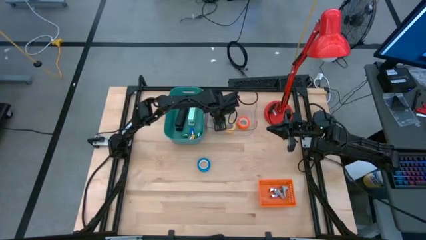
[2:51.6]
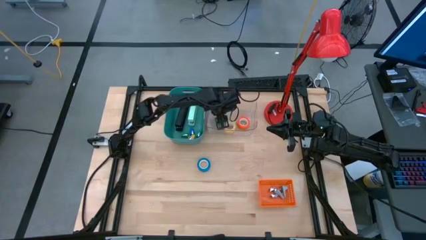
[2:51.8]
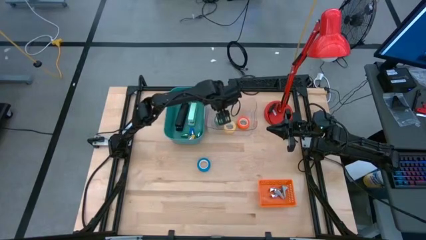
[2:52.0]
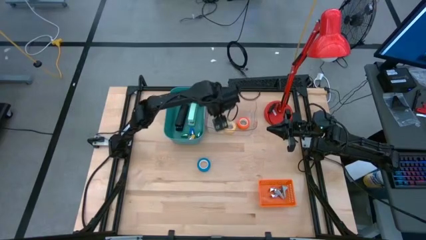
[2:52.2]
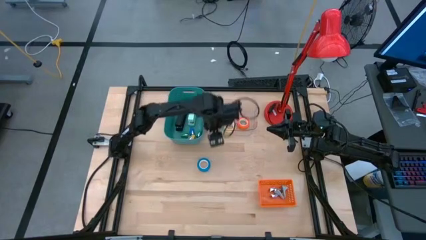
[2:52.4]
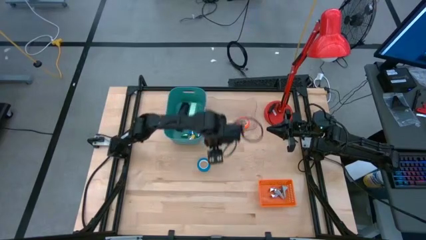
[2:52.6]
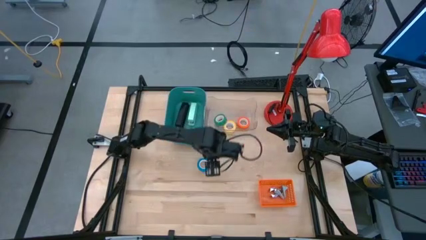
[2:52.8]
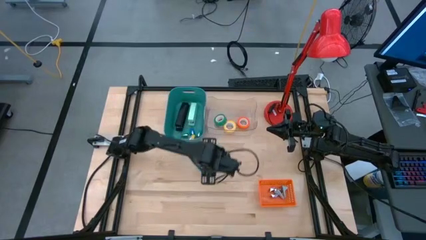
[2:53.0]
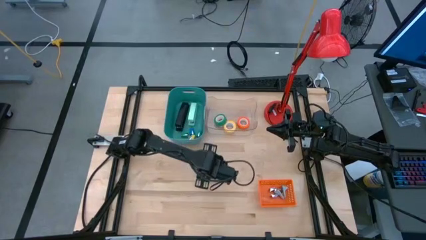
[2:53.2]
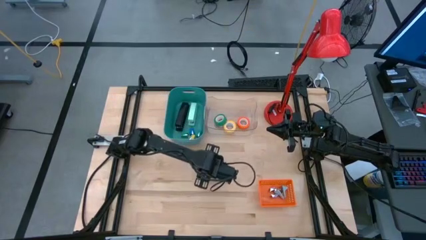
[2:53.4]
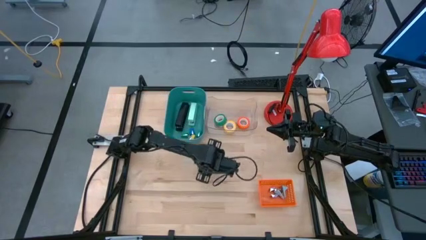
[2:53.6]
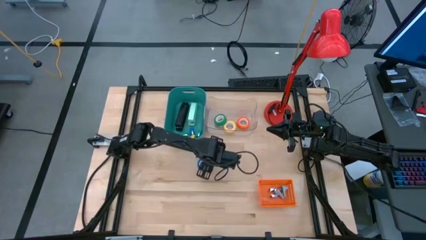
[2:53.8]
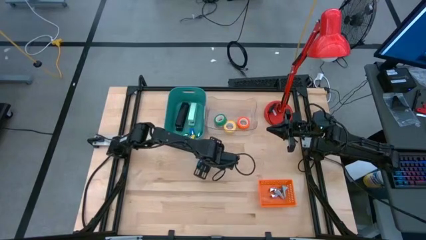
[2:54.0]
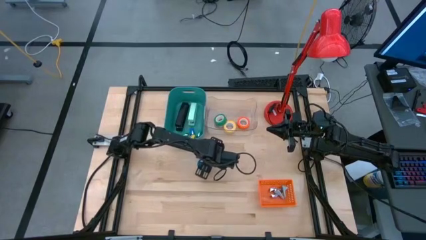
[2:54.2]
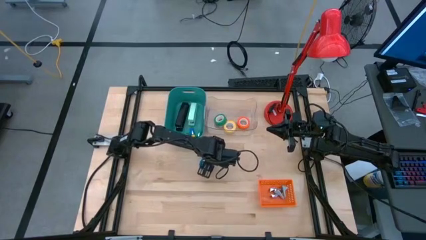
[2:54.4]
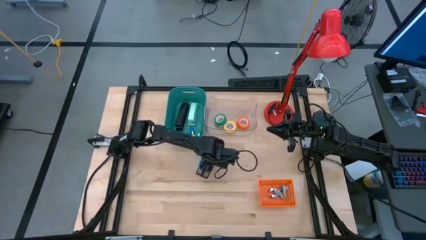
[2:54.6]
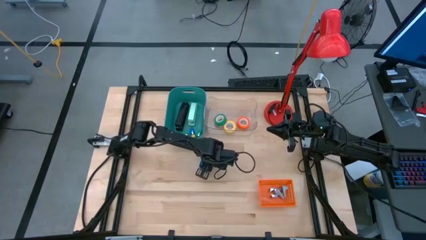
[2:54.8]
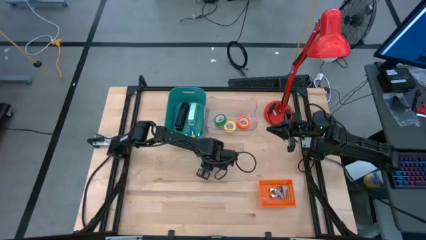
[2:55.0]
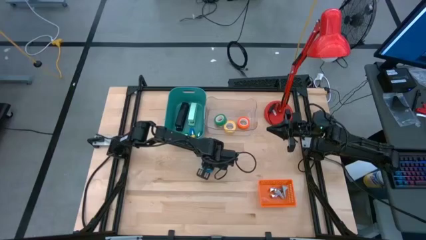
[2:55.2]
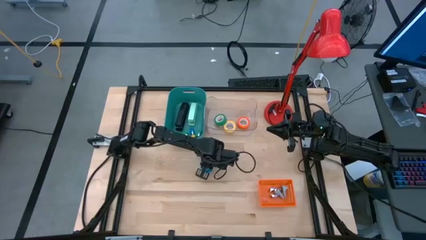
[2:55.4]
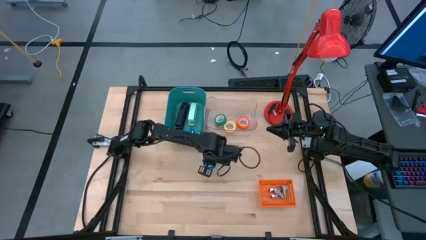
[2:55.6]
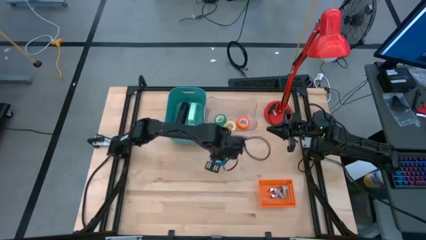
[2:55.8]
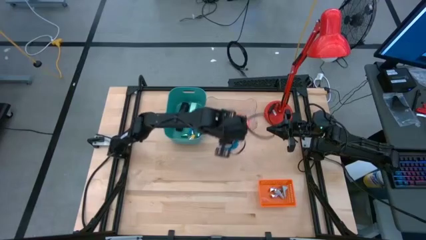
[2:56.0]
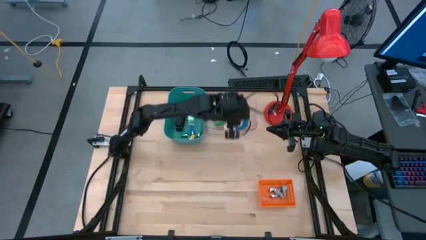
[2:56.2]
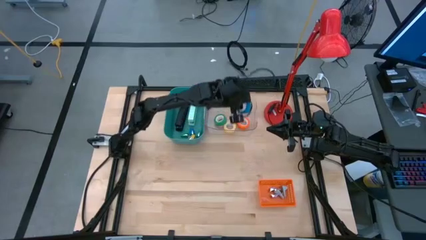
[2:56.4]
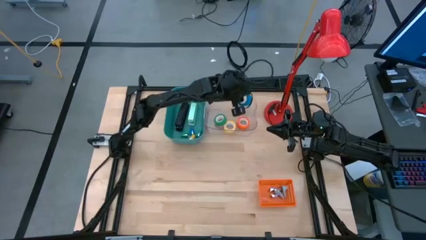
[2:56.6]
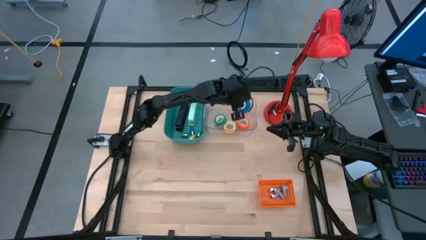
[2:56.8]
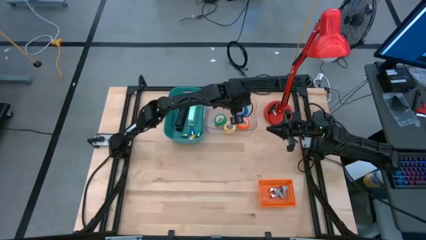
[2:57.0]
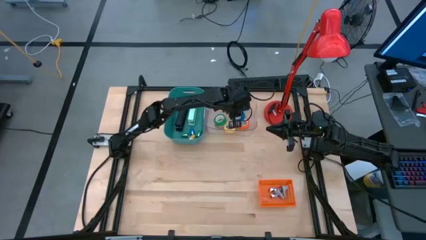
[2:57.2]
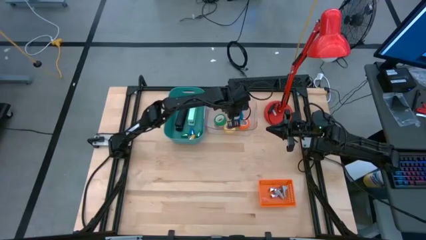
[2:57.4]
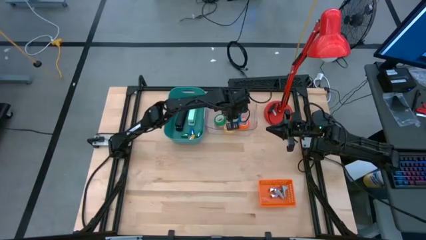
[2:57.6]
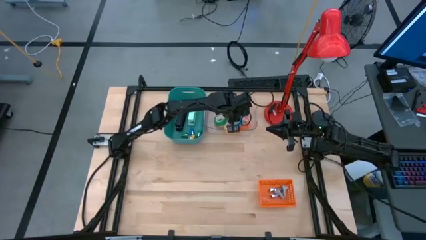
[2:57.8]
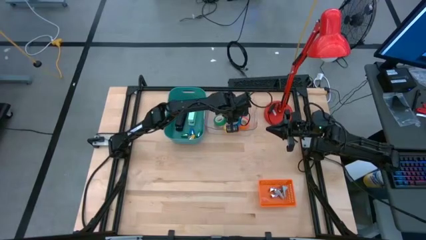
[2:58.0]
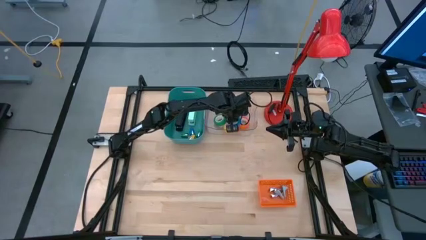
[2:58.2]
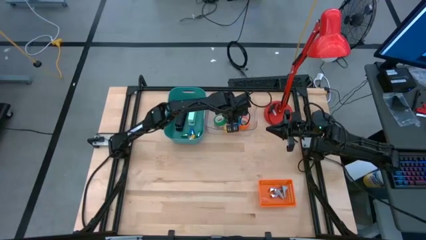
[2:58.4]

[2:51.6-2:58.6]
Task: Pick and place Stapler, Stapler remover, tape
Put the blue tape into the transparent bin

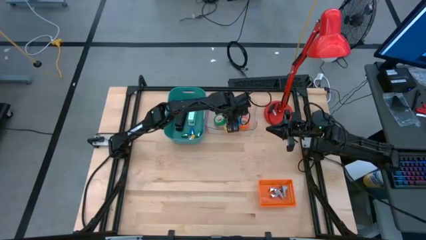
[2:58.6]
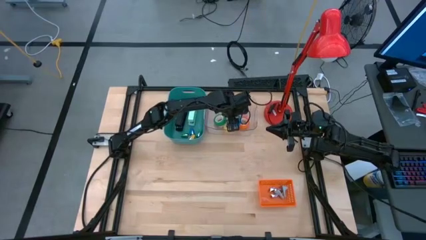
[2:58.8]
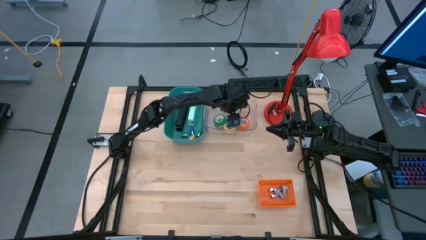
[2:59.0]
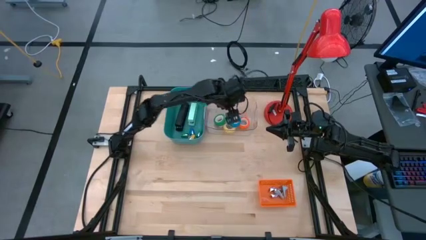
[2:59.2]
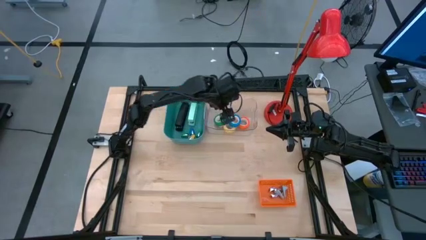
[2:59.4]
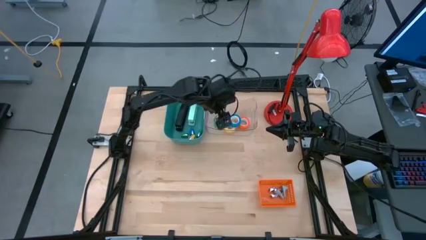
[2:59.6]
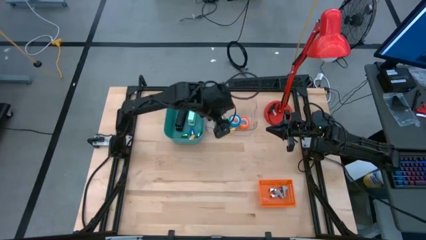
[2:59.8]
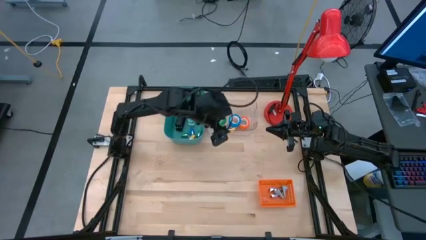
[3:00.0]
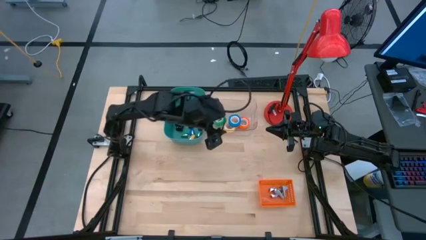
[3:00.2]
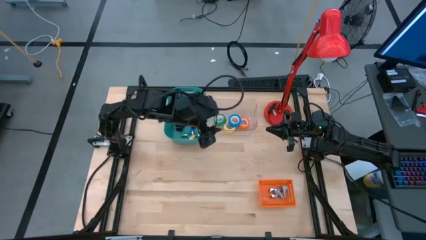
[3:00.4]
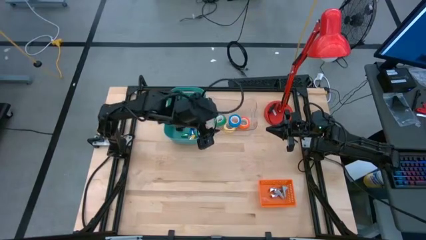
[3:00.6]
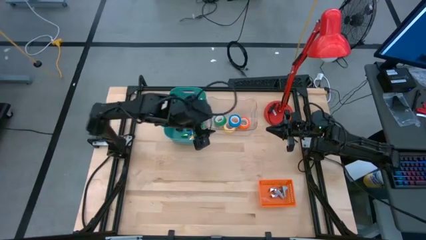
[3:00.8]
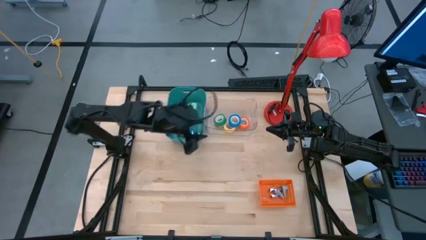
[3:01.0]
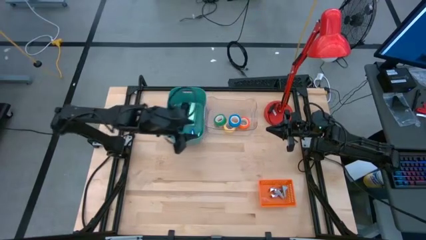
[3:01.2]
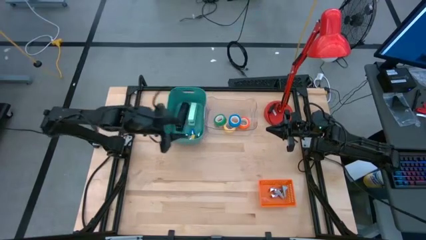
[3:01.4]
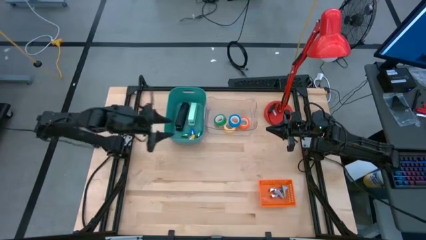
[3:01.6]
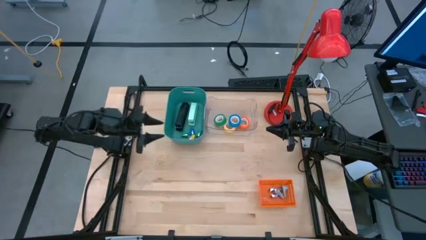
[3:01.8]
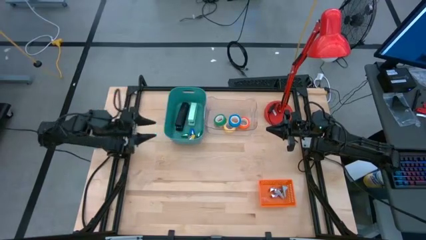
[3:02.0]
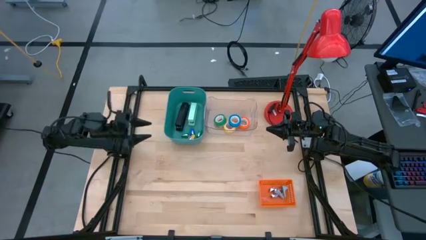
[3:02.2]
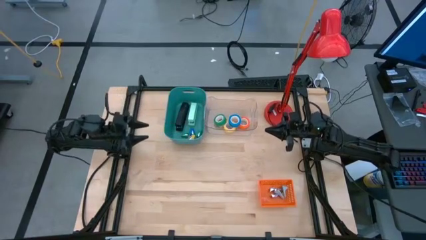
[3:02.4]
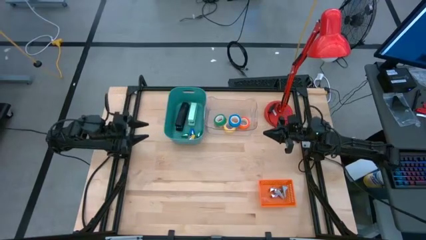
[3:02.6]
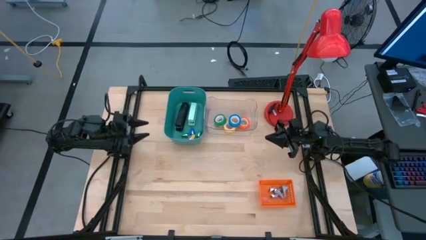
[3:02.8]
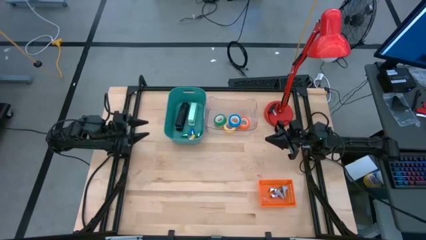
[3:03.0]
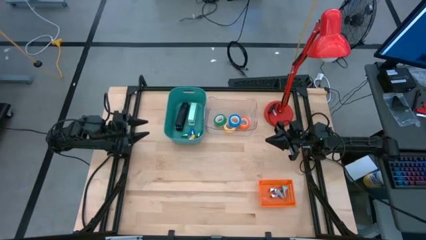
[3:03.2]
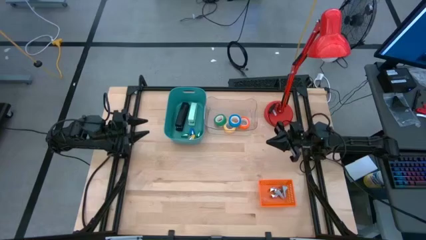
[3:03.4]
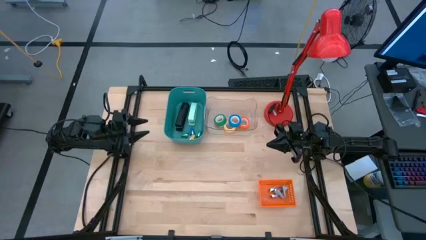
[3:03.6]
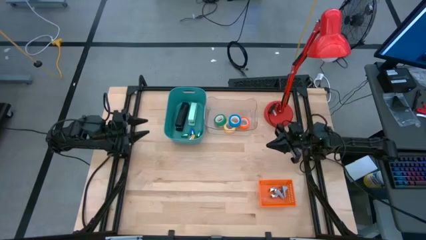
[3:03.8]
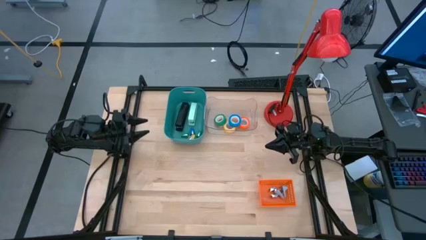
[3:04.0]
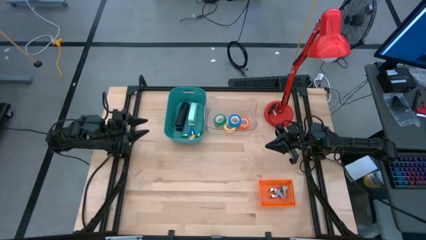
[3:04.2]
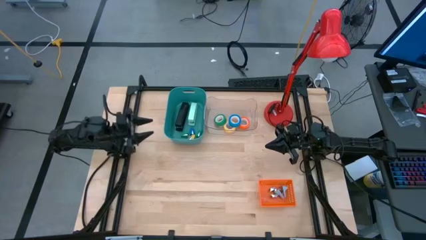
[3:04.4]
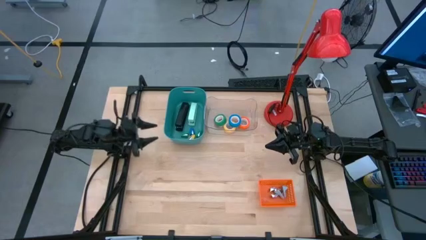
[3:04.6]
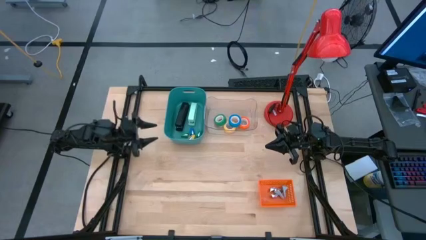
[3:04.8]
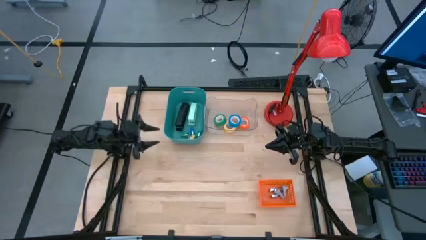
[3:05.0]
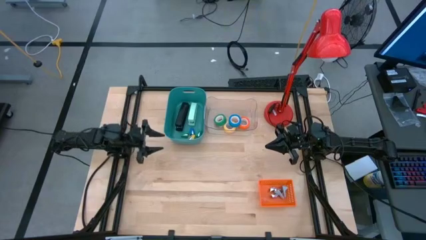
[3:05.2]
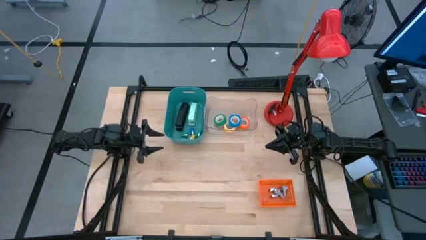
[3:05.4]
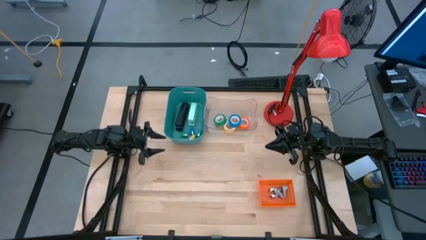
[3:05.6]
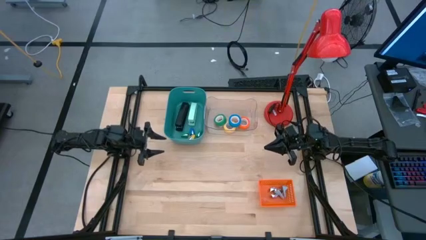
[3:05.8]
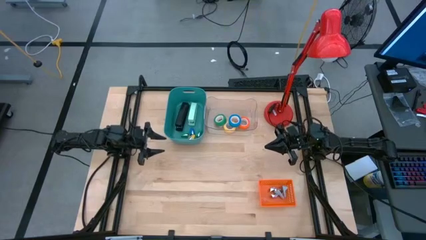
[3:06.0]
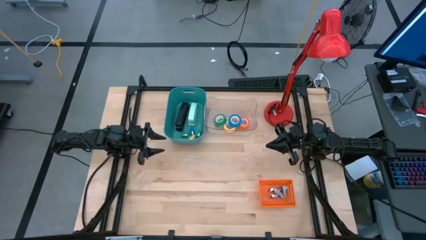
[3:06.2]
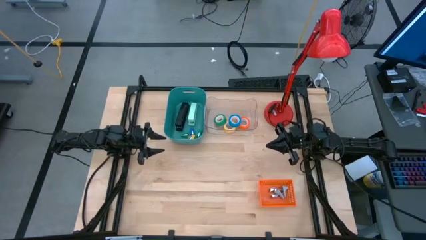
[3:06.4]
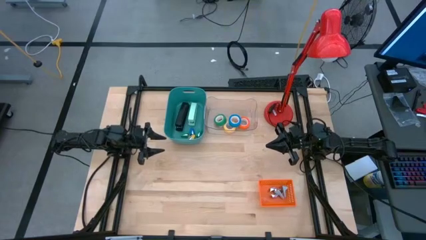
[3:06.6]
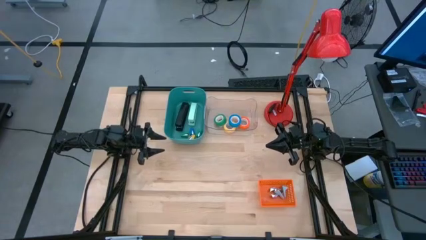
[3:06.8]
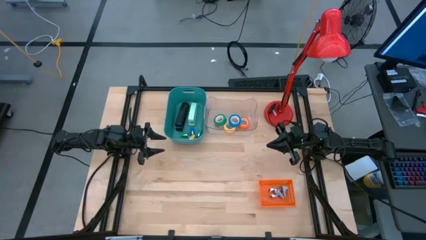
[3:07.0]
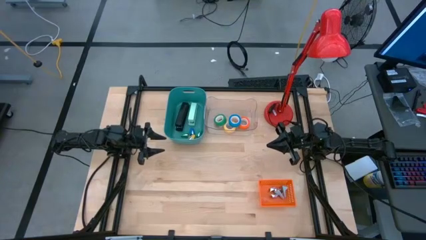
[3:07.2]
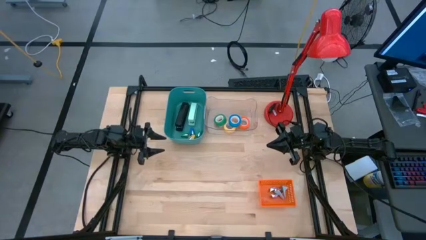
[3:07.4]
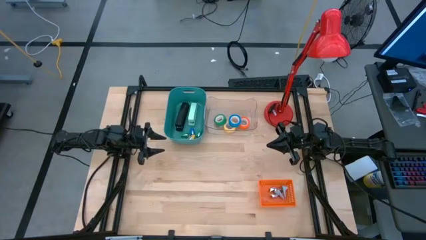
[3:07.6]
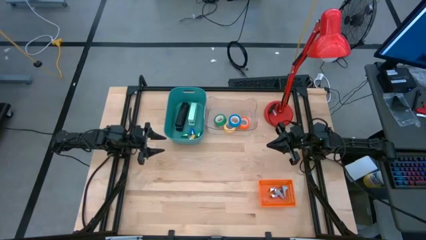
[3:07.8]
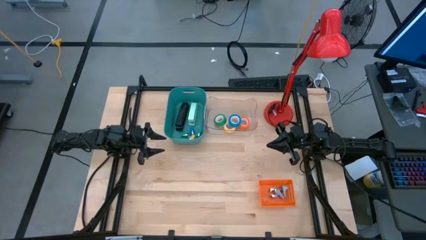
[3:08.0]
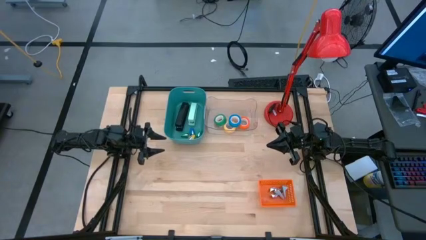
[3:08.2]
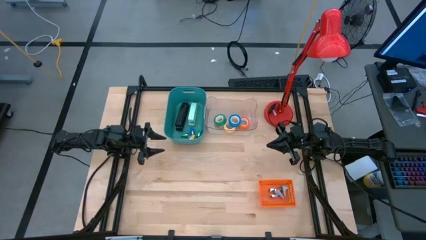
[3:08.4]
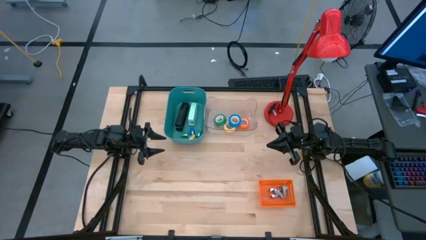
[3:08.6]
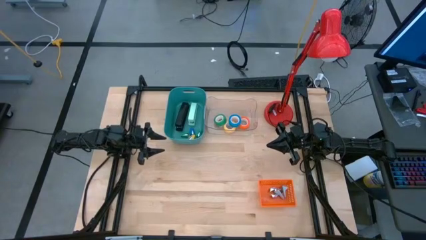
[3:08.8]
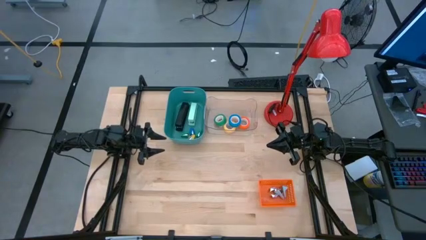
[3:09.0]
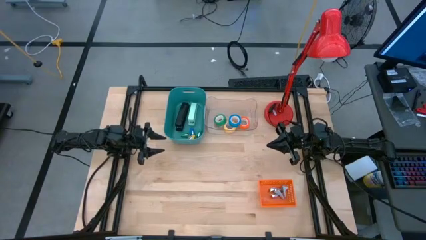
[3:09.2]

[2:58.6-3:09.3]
Return to Home Position
